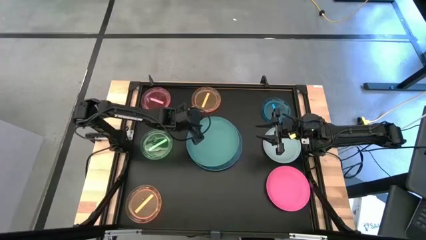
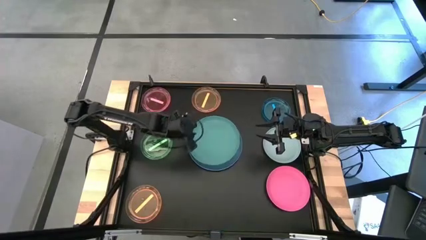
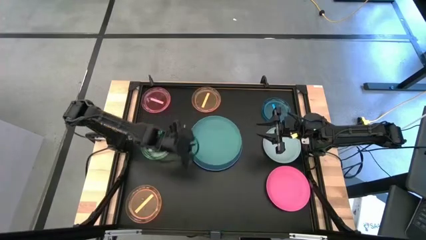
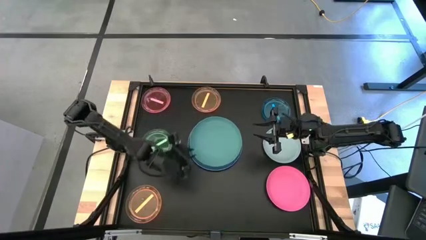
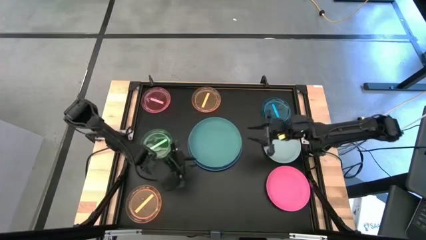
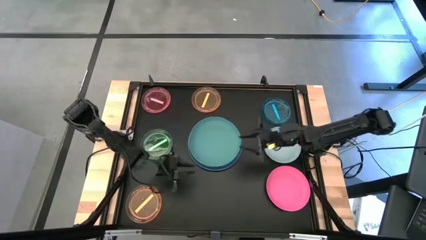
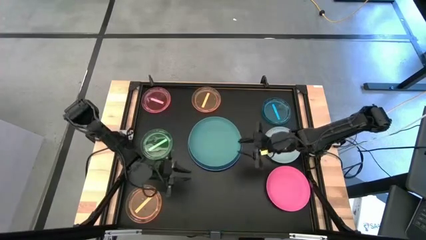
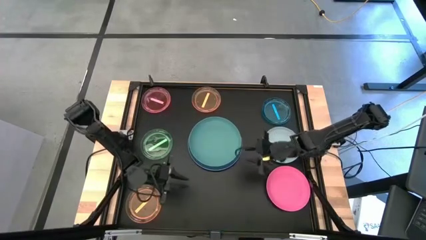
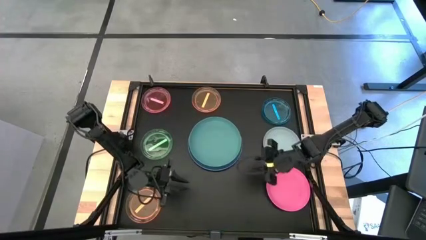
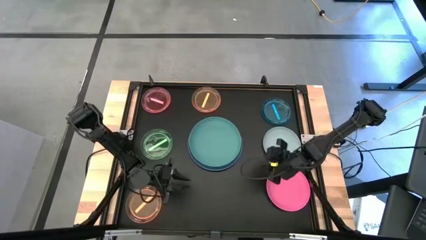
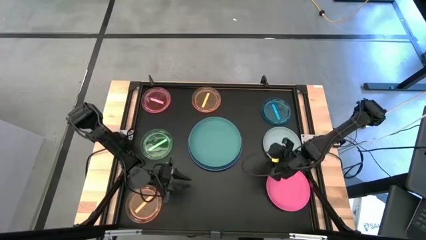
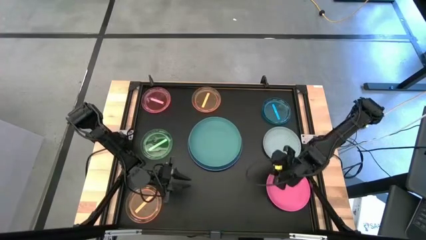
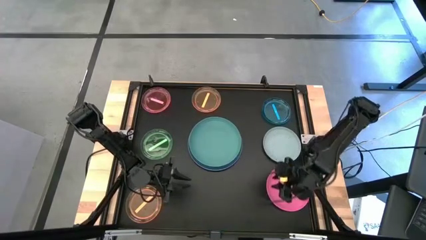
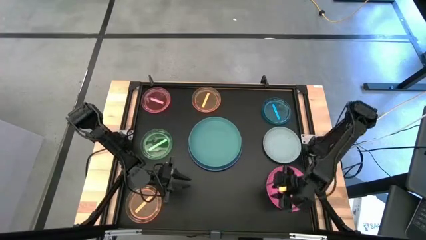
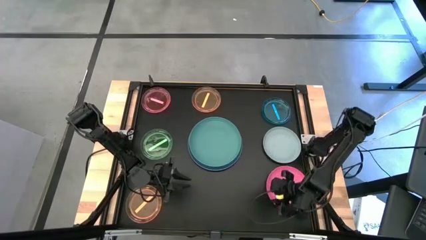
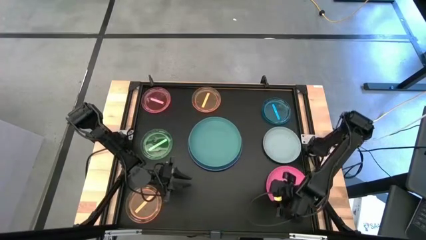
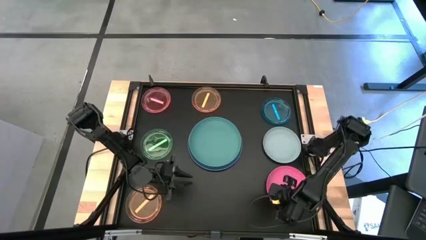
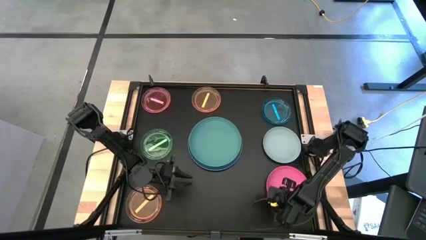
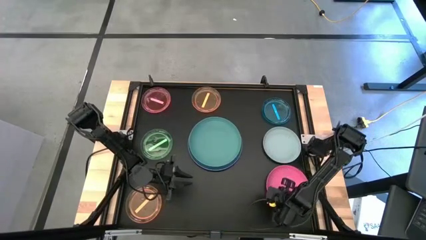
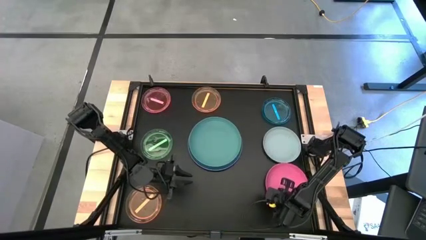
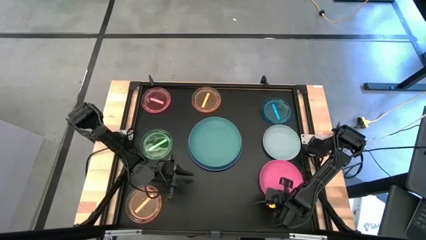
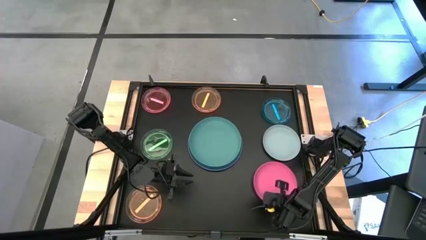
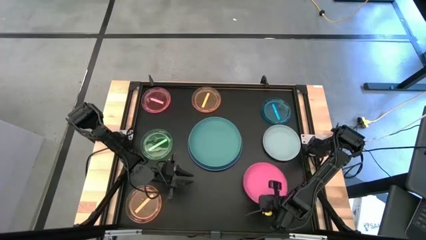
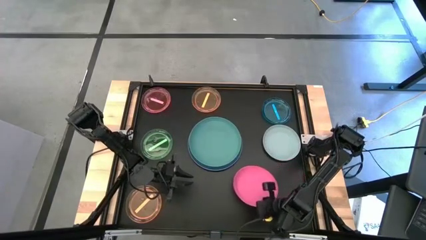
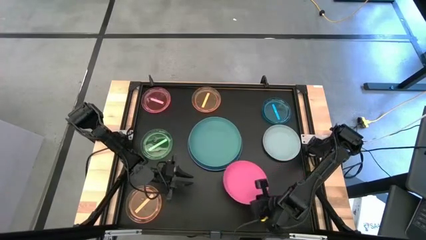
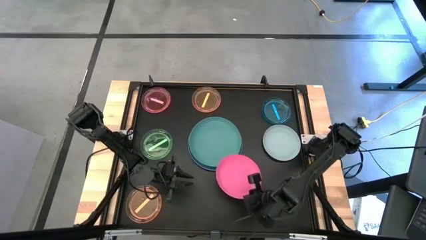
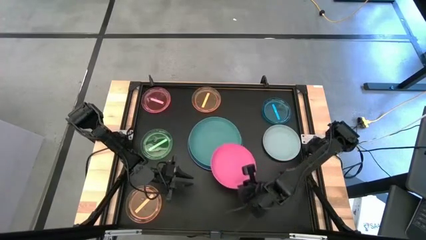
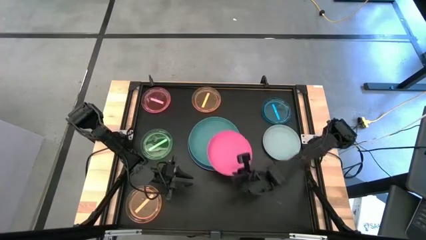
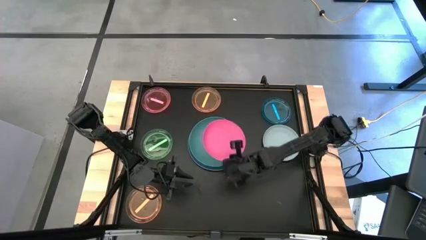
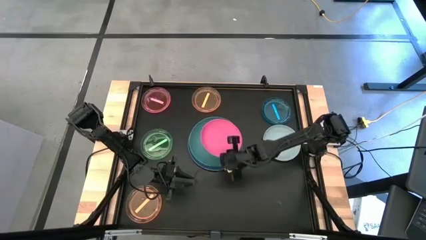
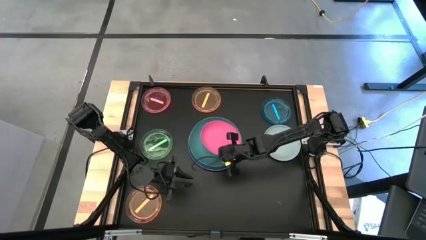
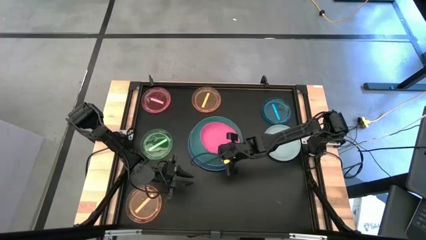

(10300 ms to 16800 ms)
Task: Stack plastic plates
Stack the pink plate on top of the green plate

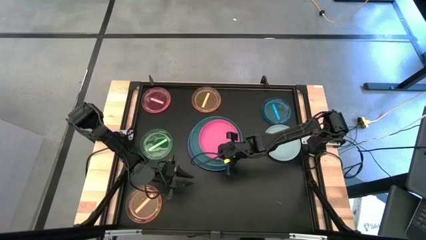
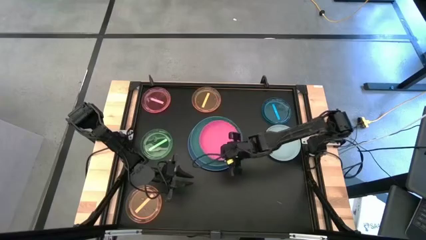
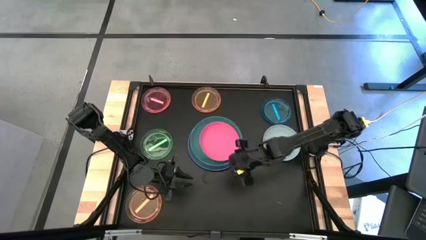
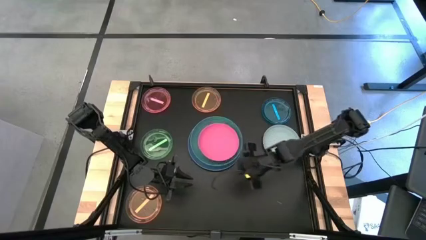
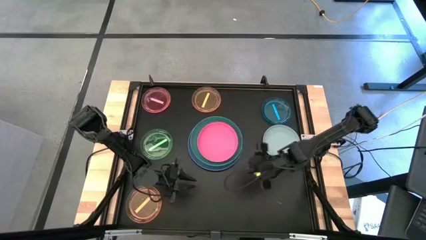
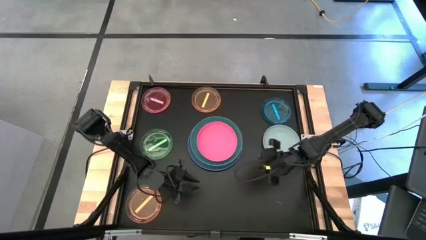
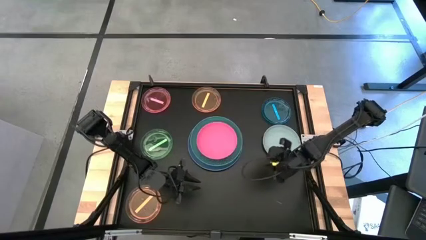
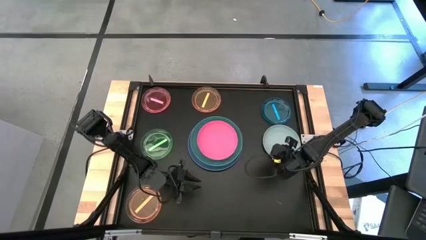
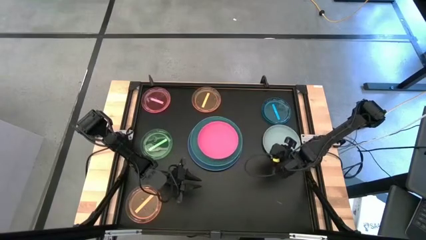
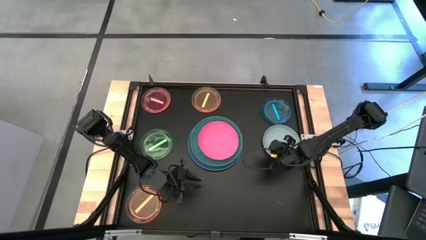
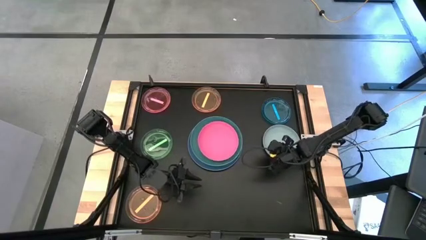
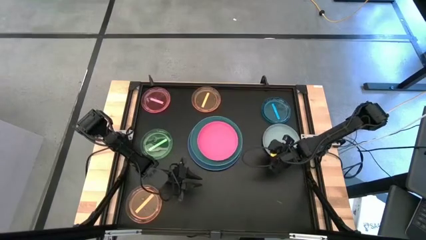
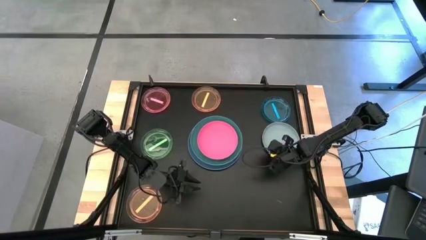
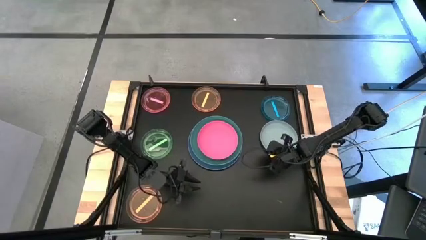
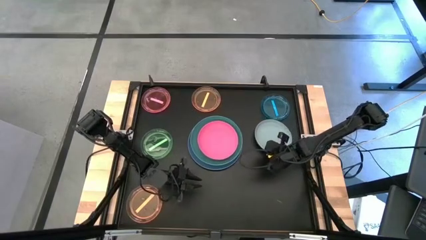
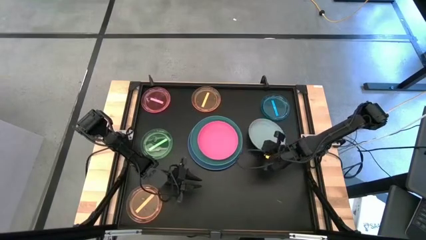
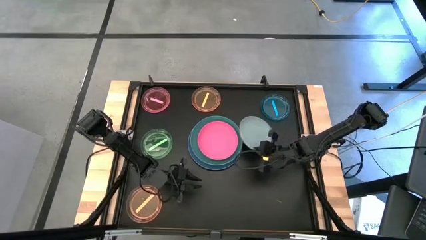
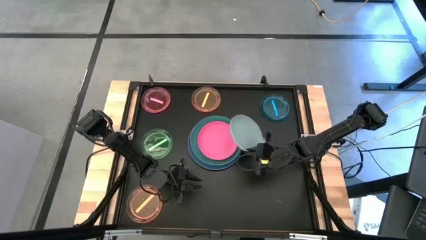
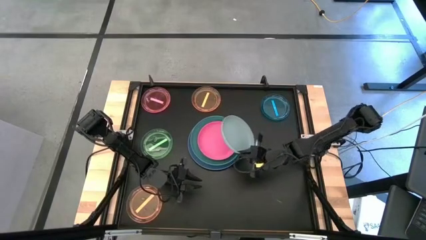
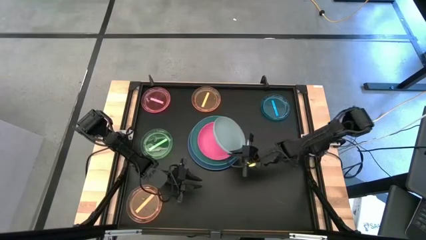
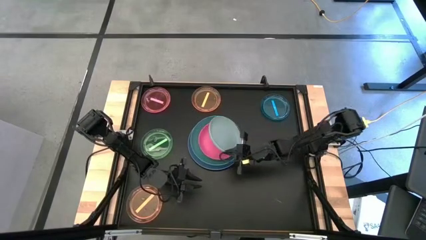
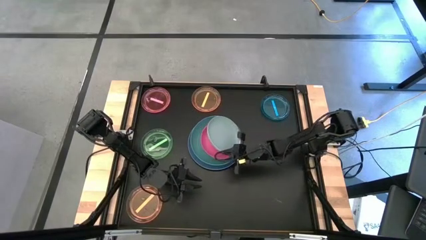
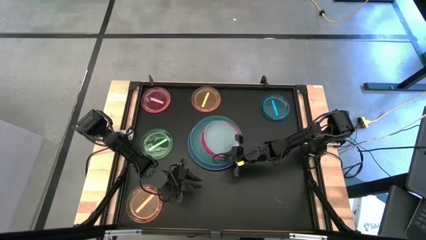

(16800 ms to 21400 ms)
Stack the gray plate on top of the pink plate

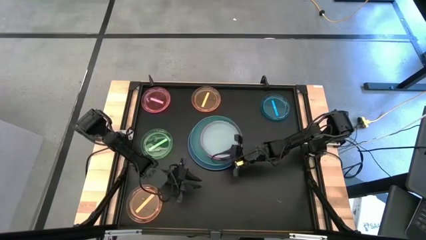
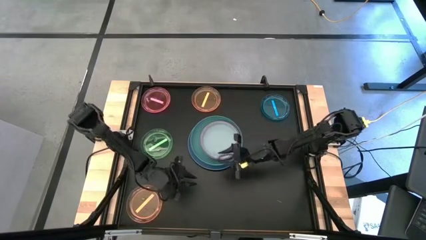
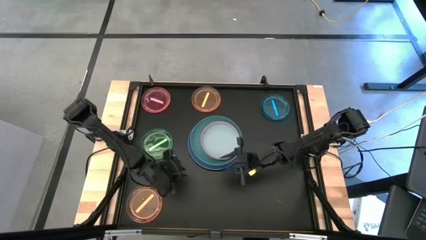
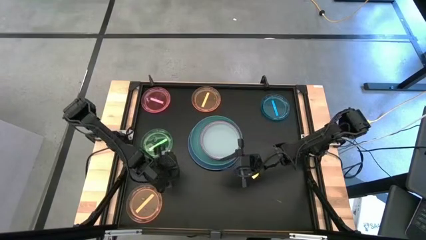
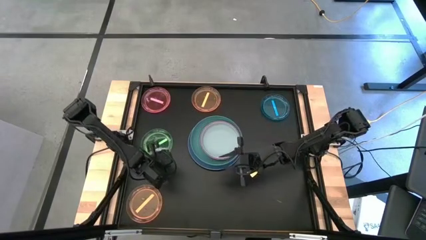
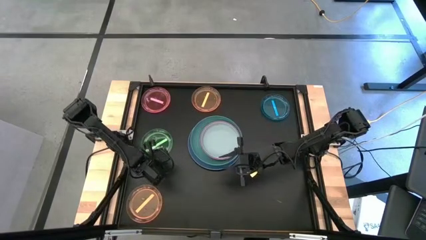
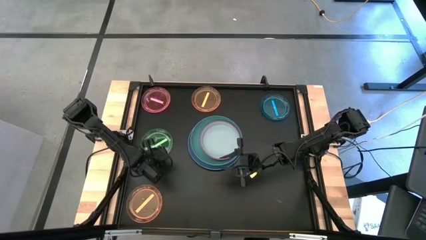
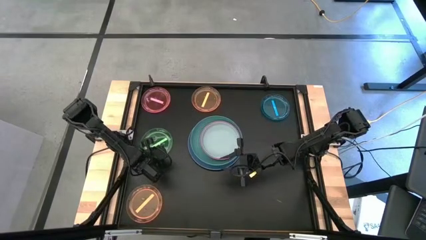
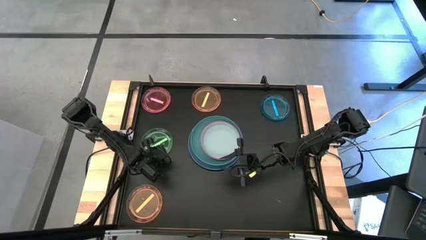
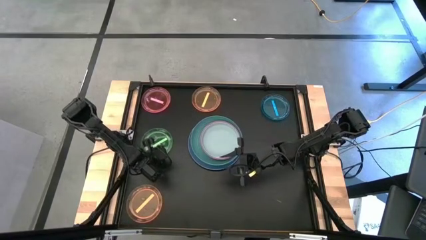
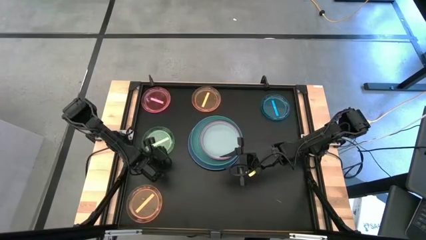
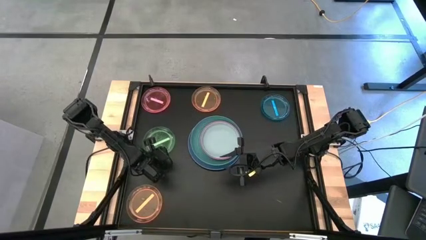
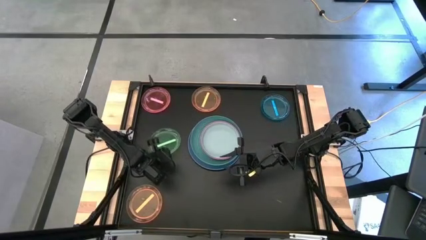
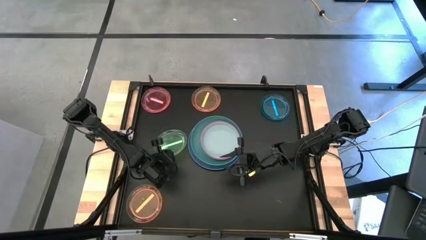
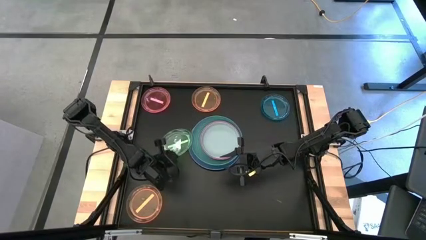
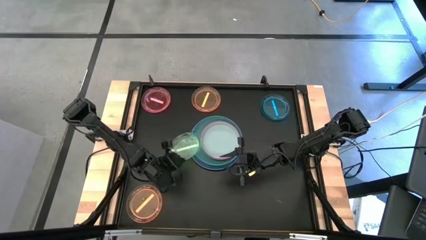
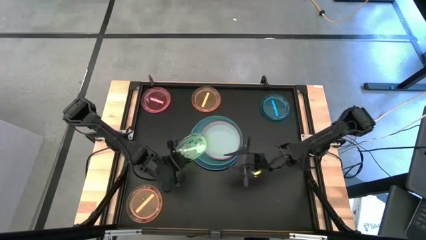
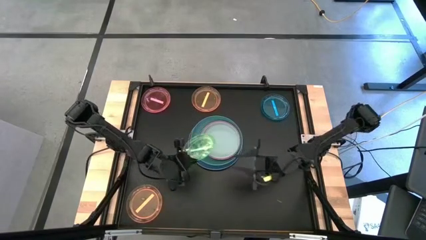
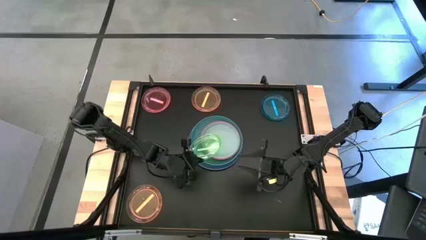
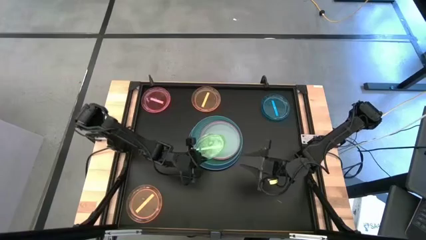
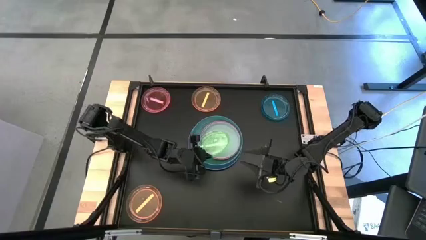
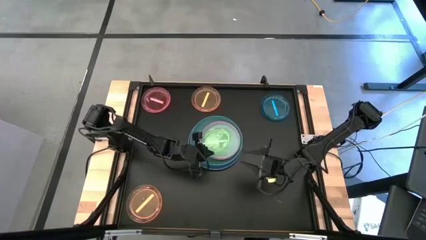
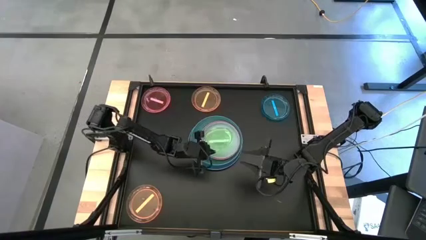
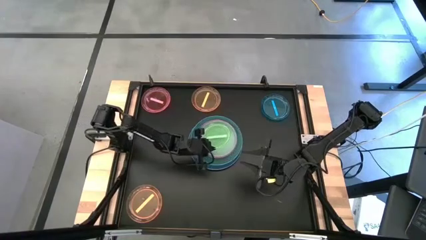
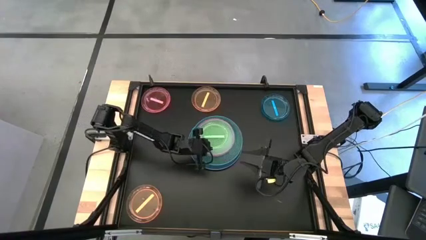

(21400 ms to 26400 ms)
Stack the green transparent plate on top of the gray plate
